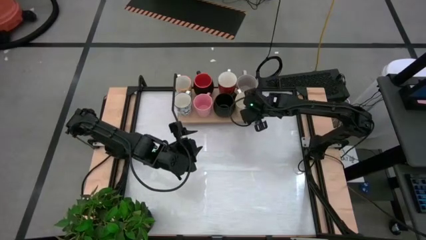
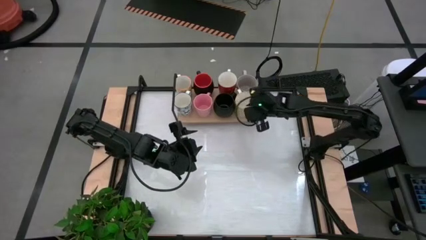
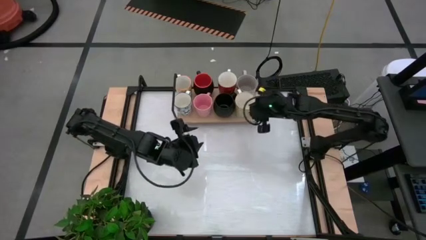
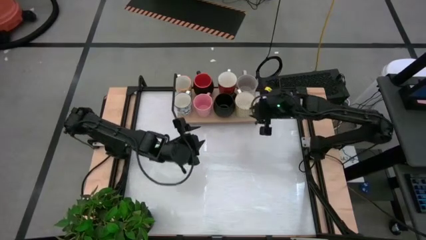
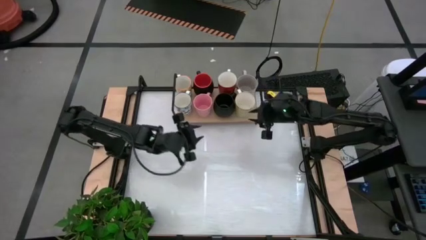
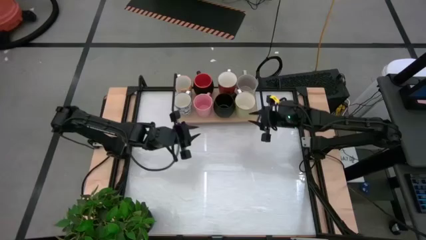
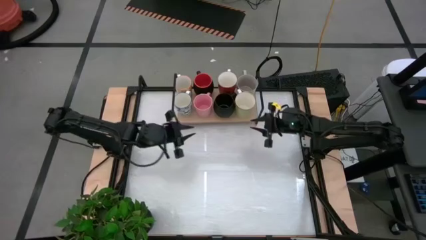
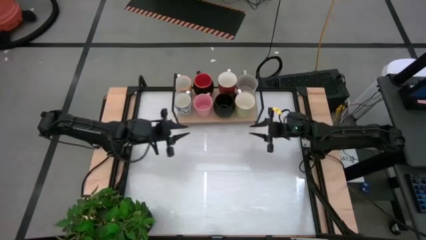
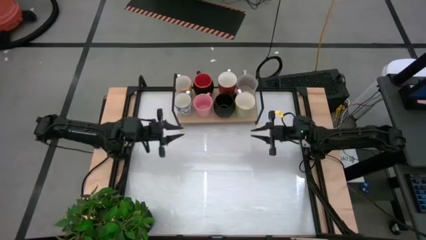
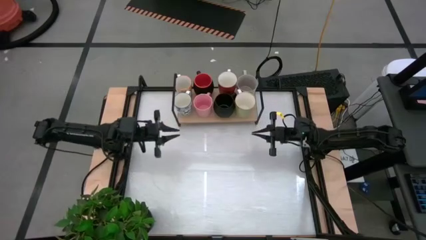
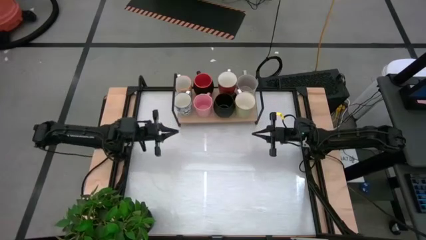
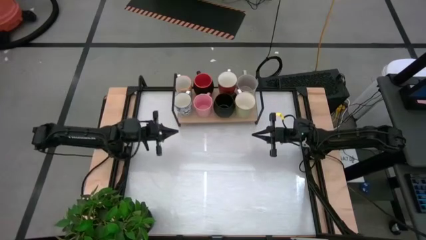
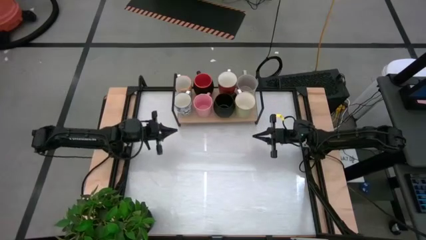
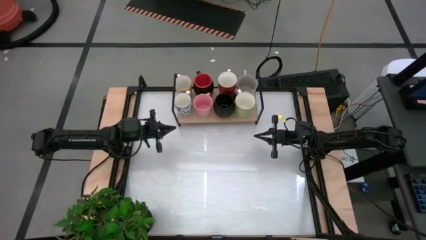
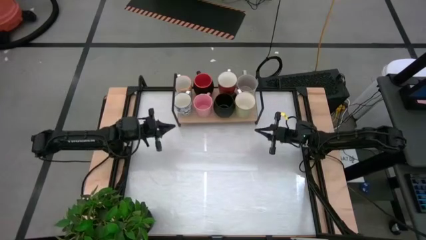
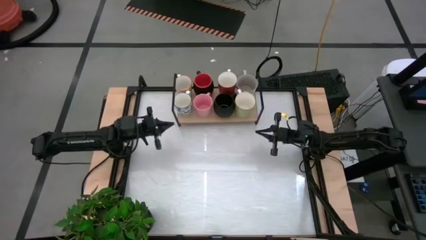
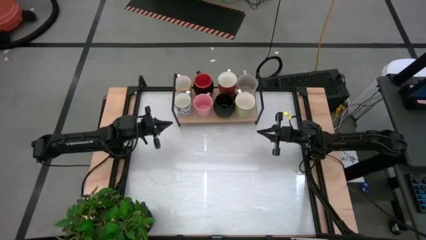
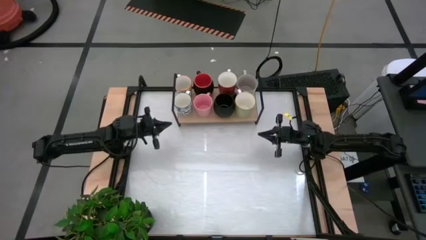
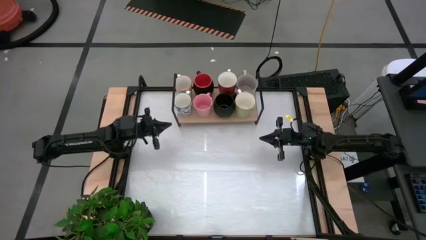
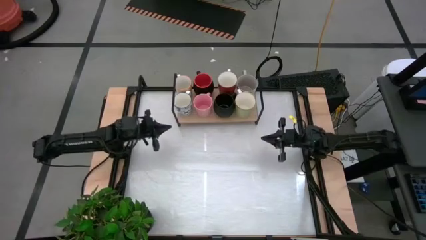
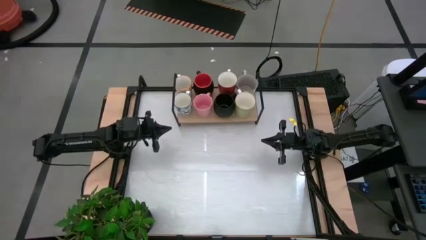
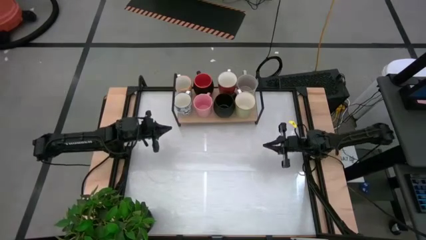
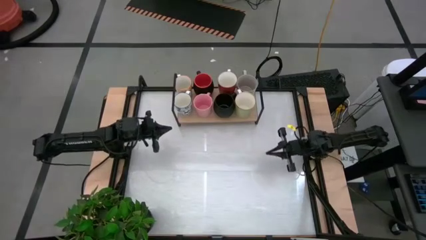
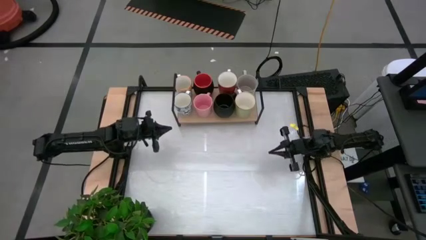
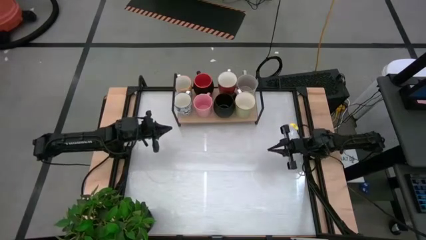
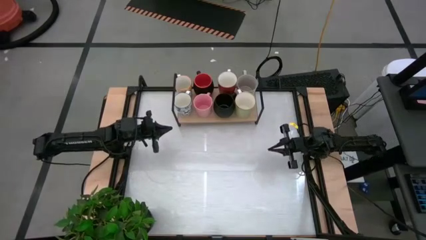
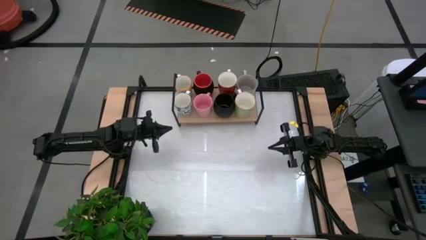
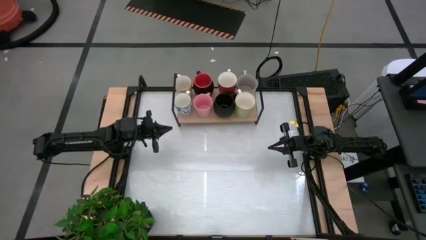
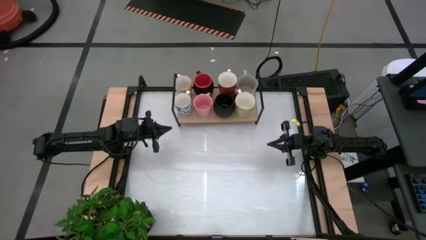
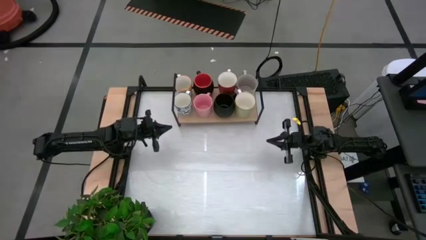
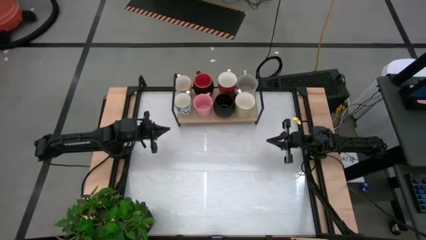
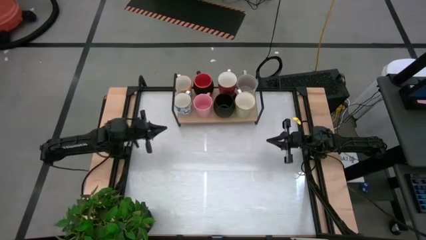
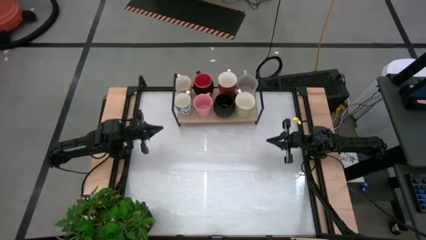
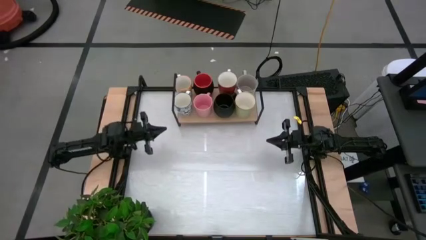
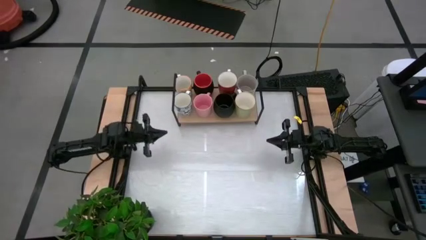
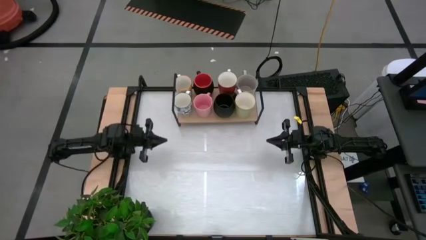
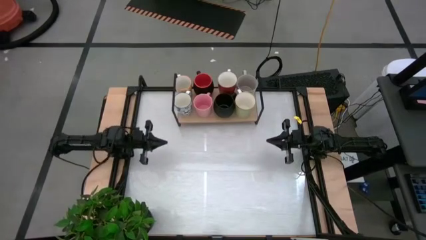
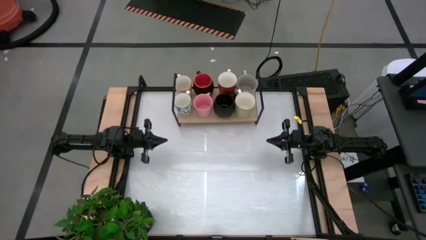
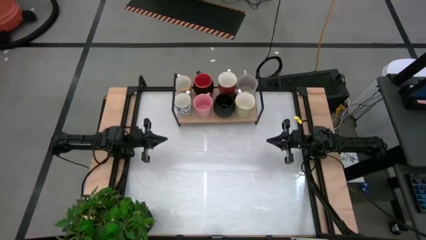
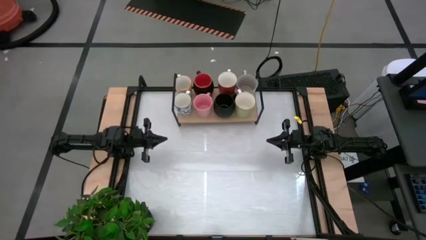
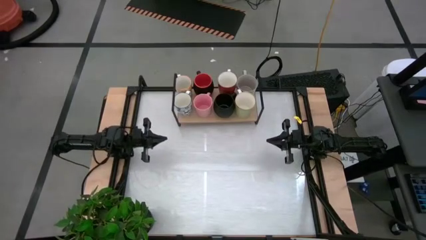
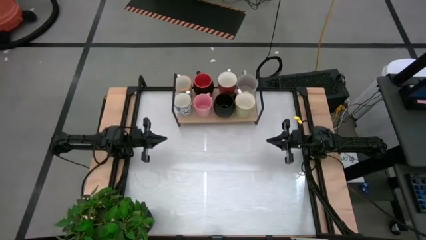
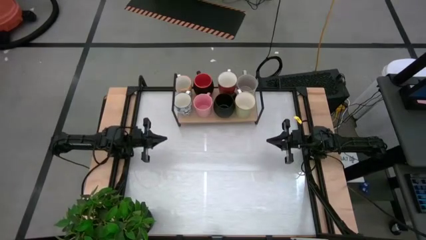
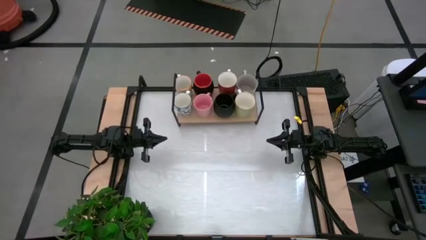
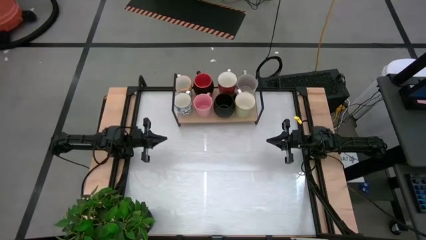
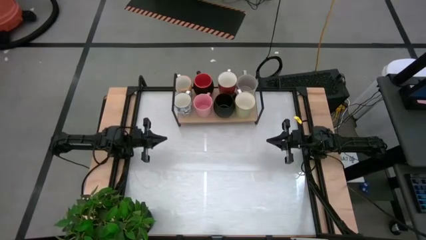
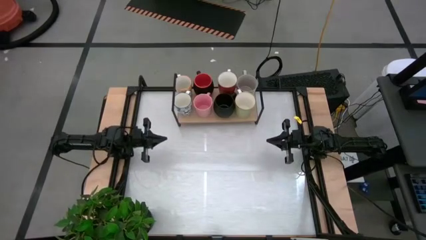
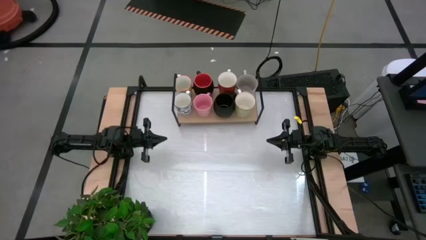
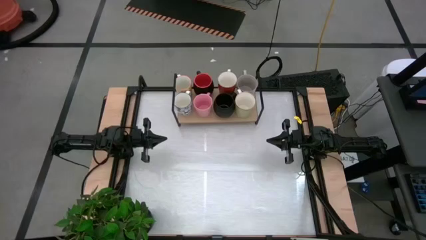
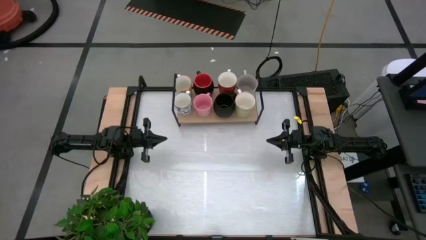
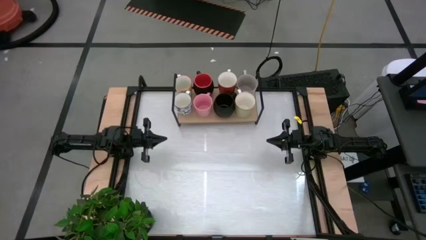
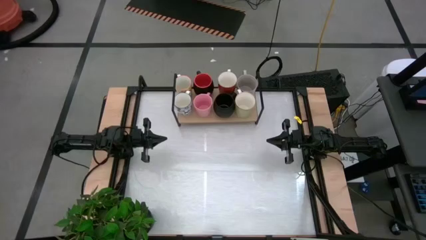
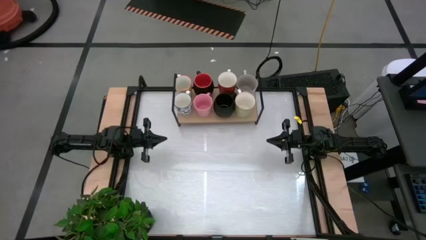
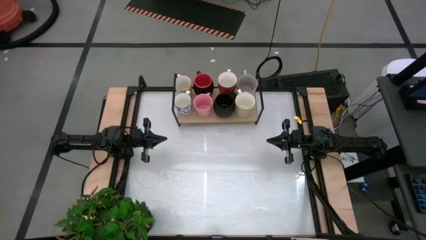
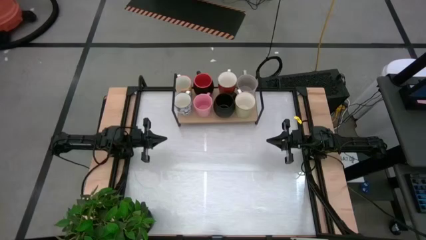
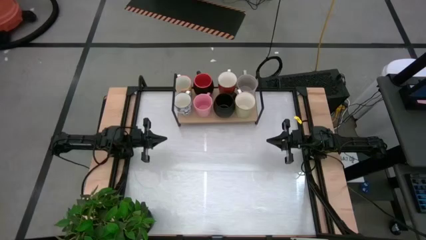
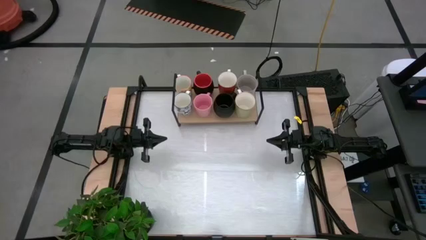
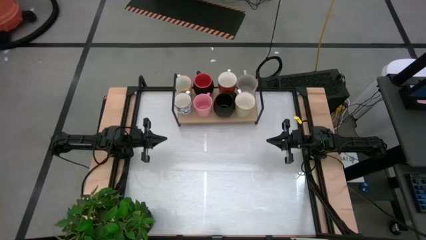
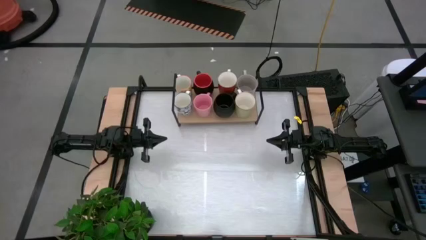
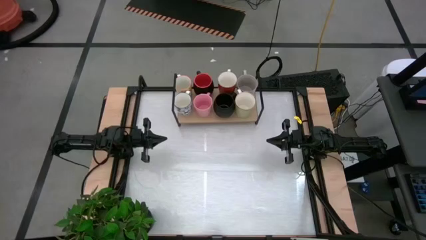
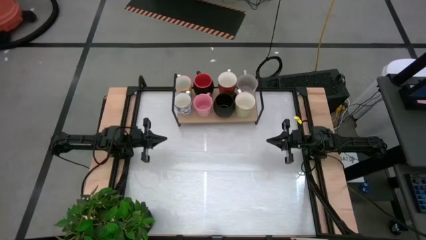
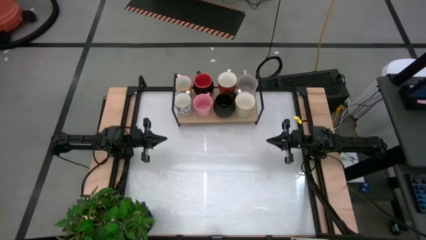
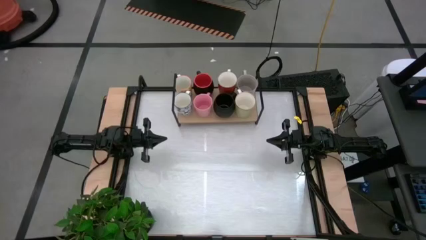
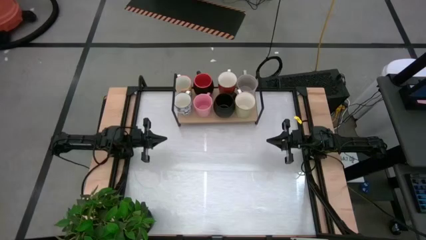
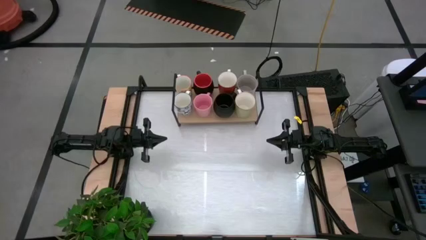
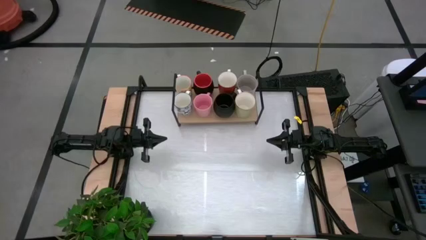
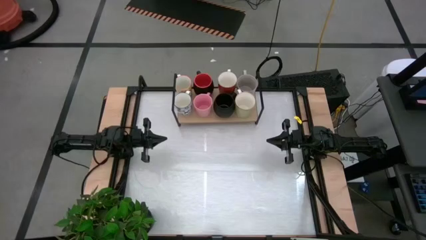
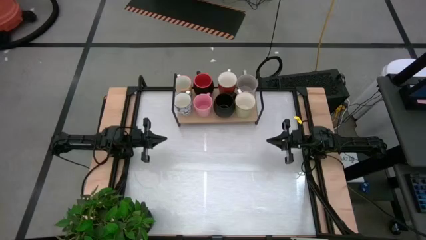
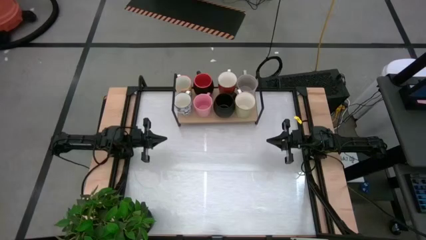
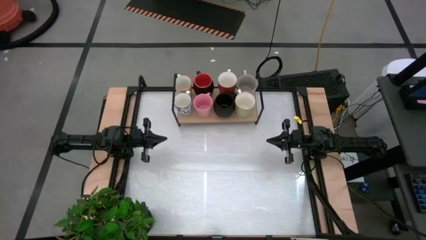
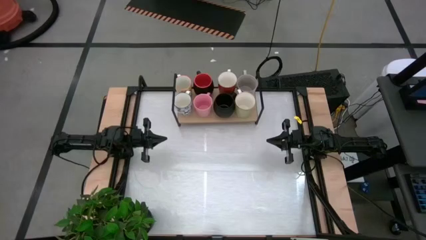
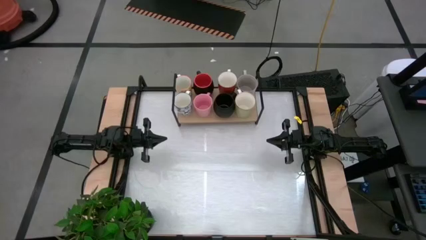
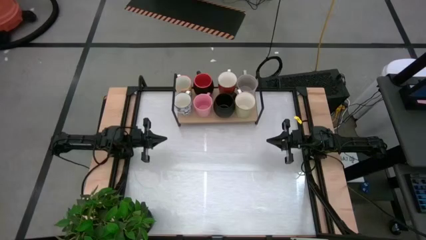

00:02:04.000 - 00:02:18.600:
Task: Place coffee mugs
Return to Home Position

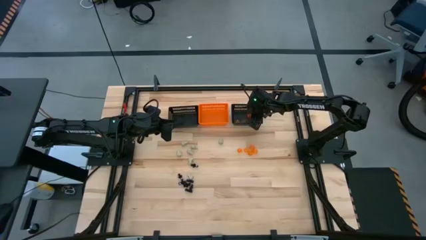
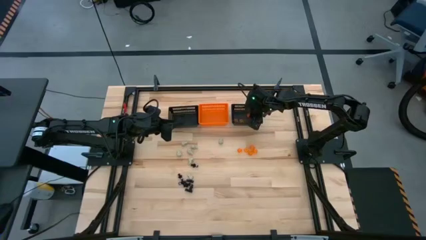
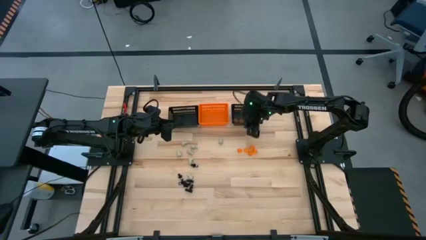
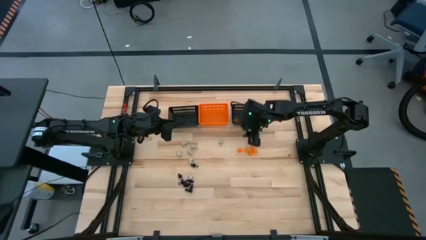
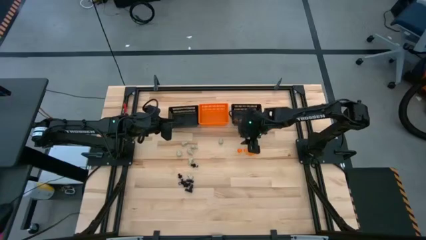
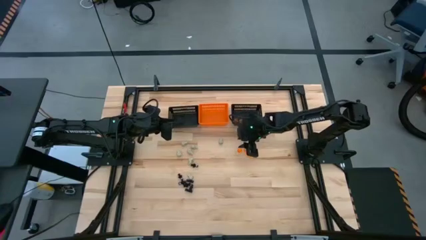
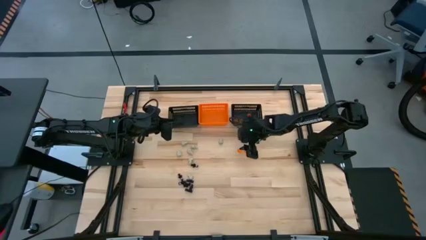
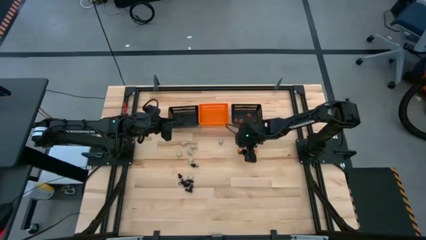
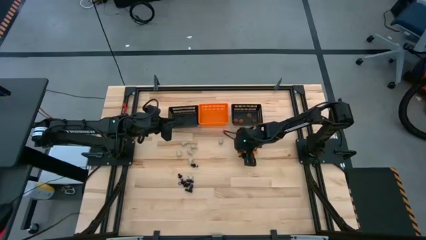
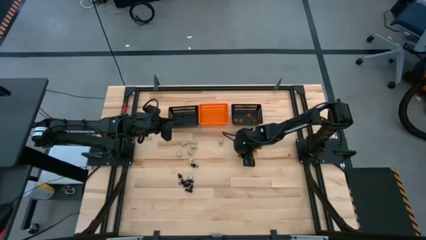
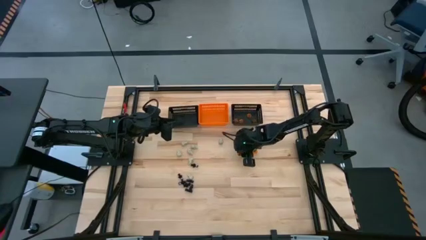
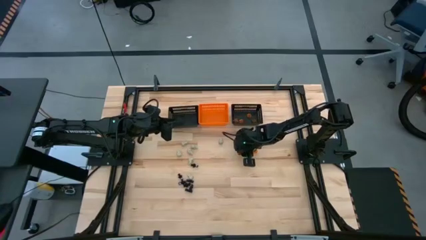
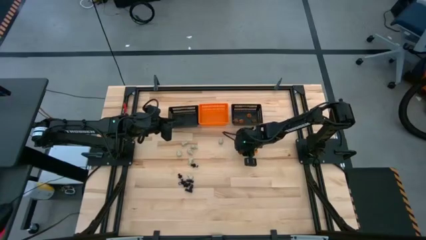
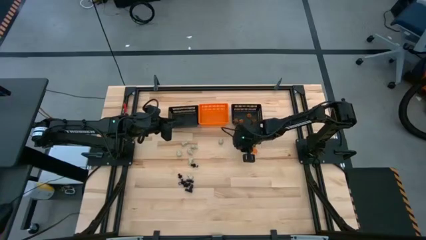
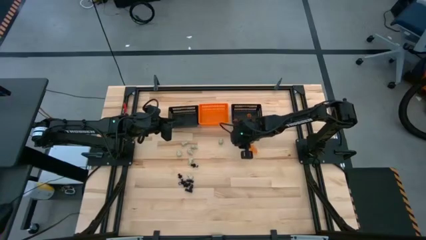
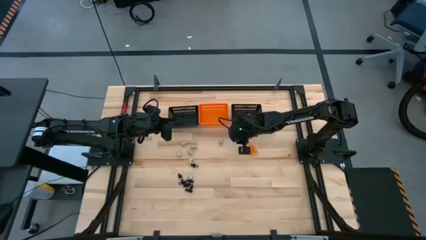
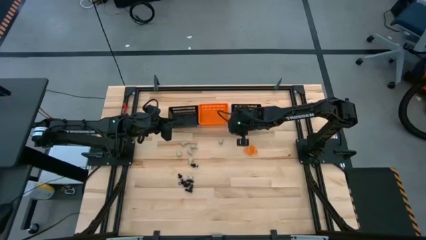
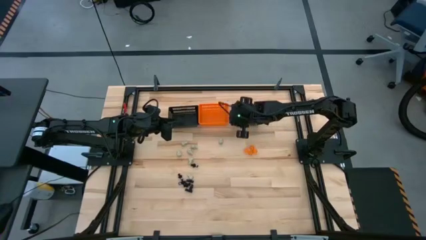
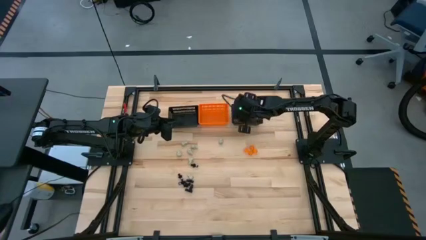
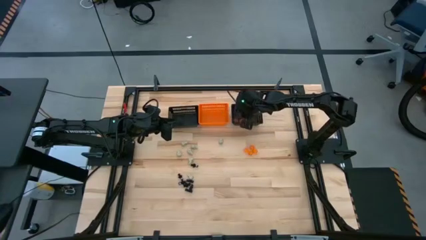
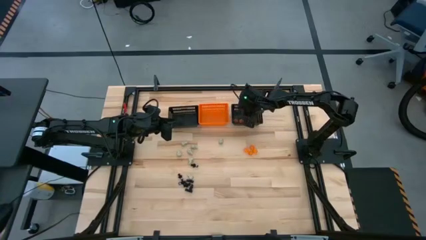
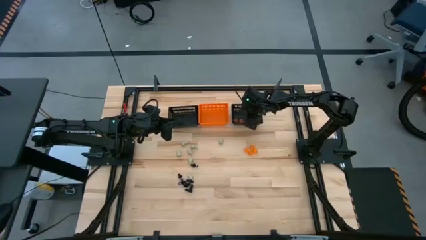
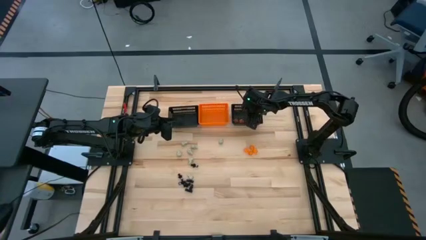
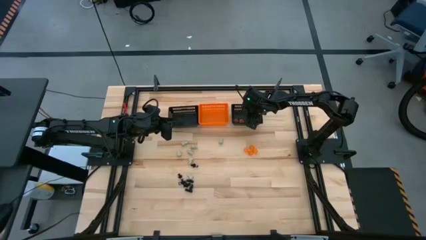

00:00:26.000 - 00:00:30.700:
Task: Sort Halloween decoration
Put the orange pumpkin toy into the right black bin
